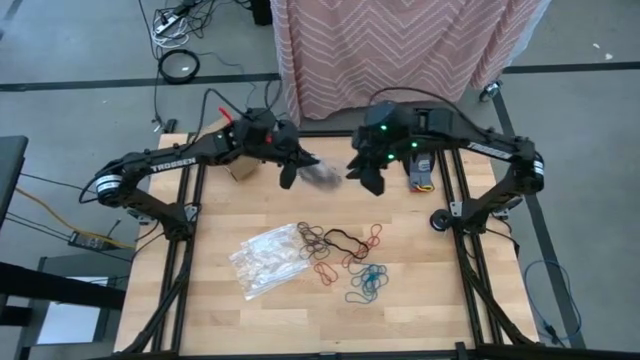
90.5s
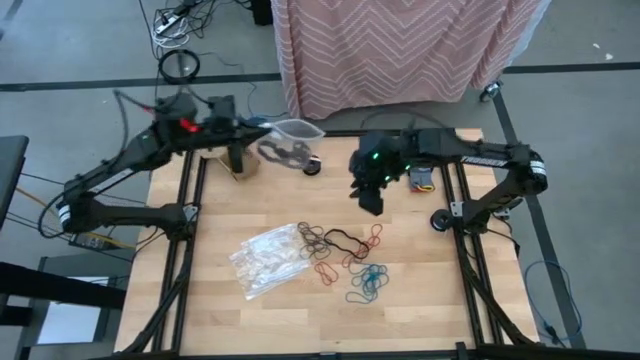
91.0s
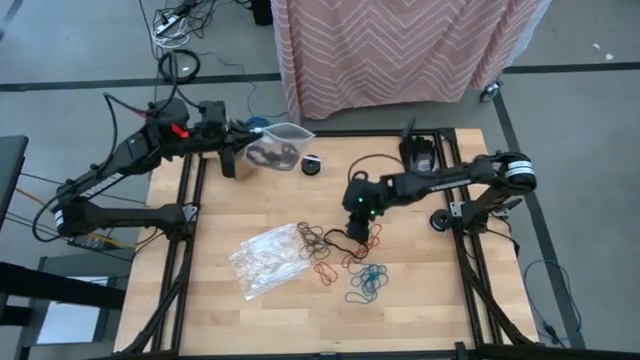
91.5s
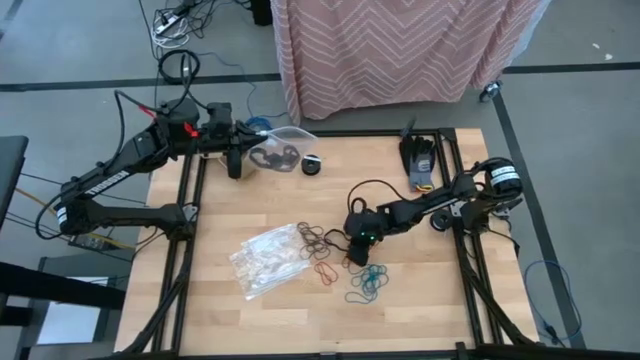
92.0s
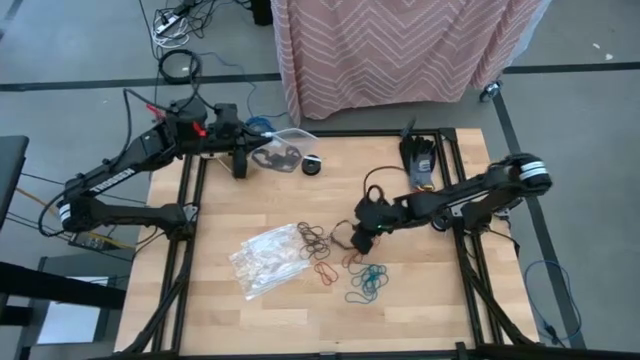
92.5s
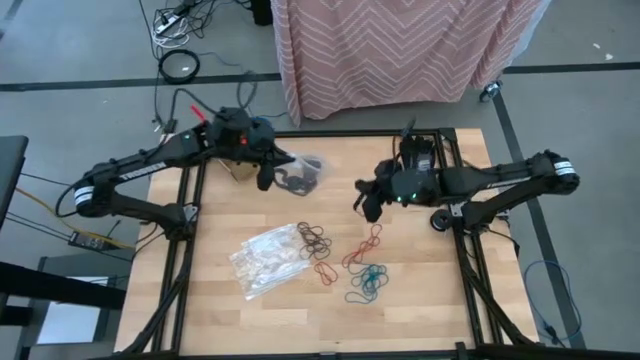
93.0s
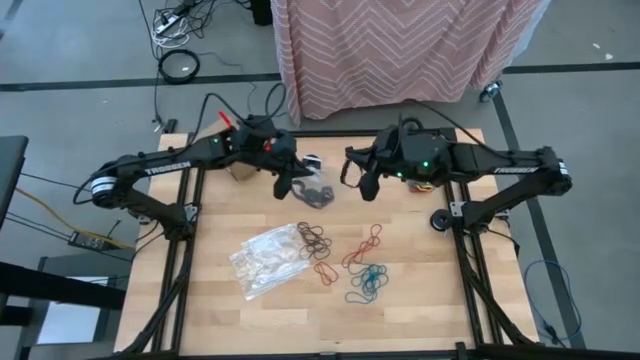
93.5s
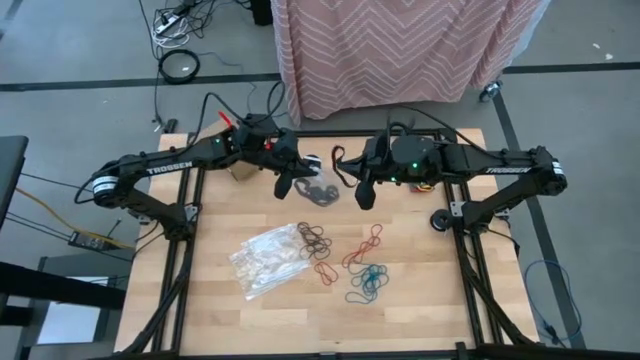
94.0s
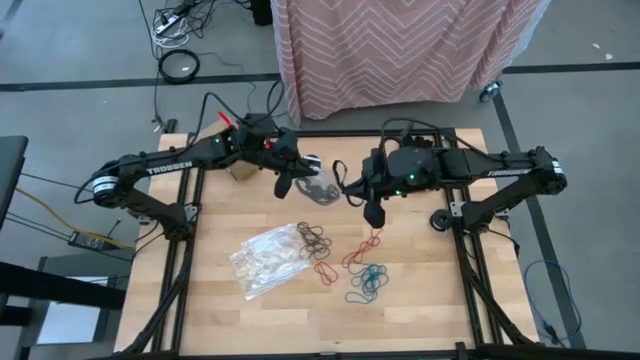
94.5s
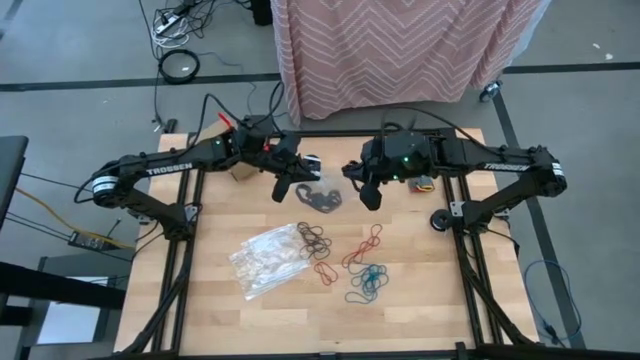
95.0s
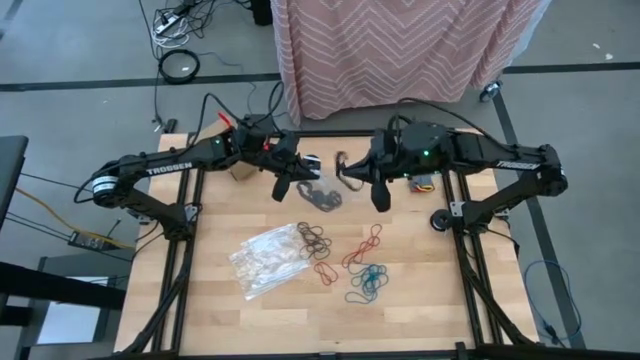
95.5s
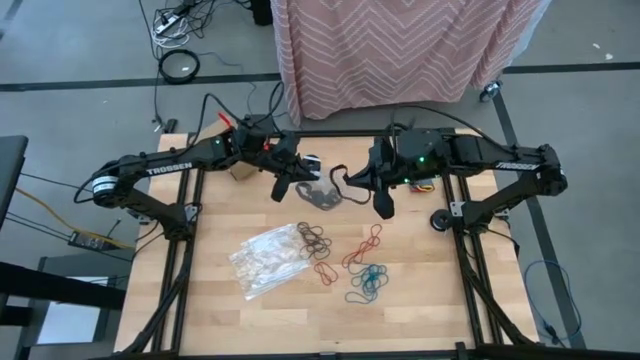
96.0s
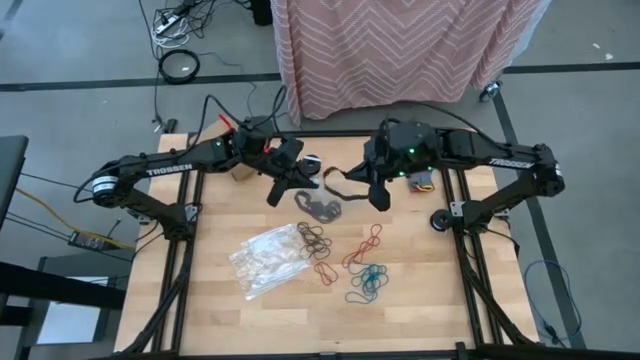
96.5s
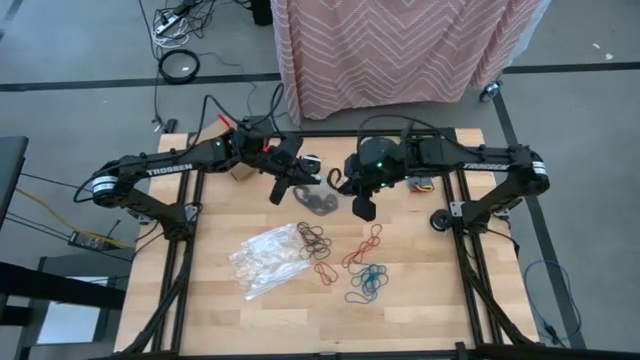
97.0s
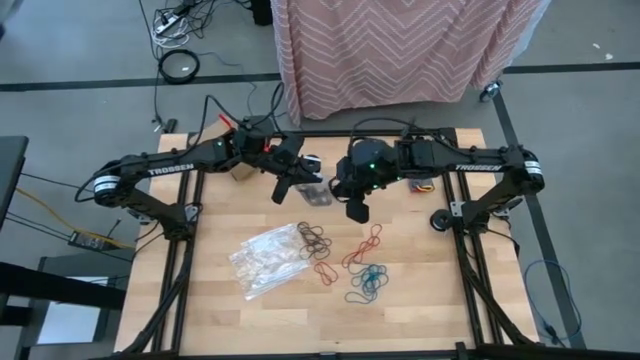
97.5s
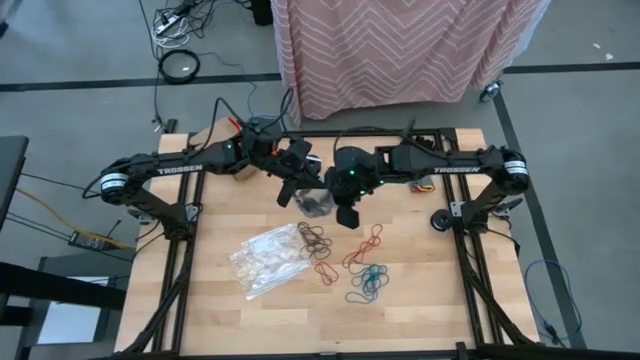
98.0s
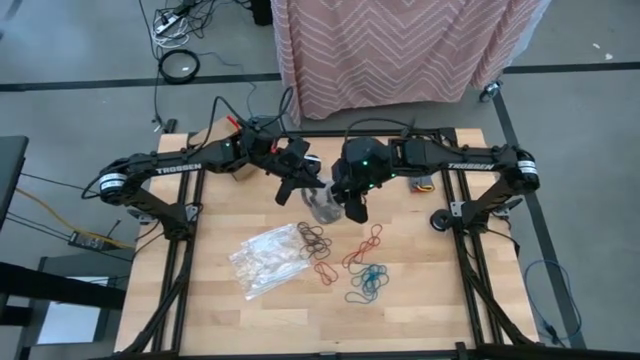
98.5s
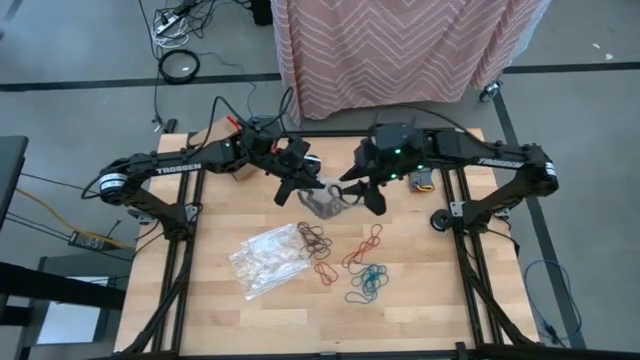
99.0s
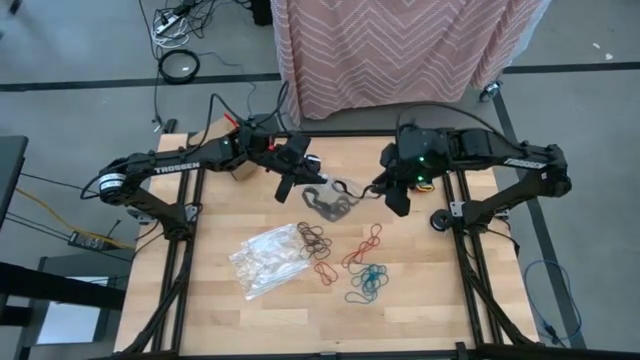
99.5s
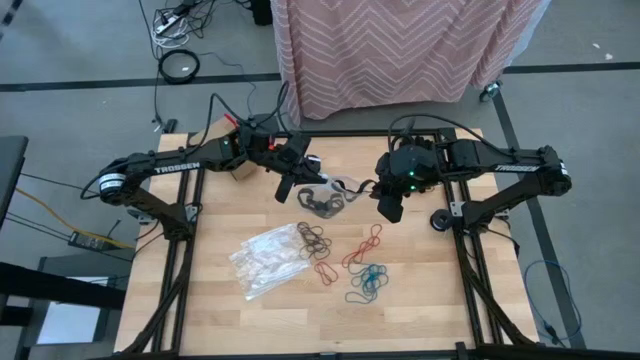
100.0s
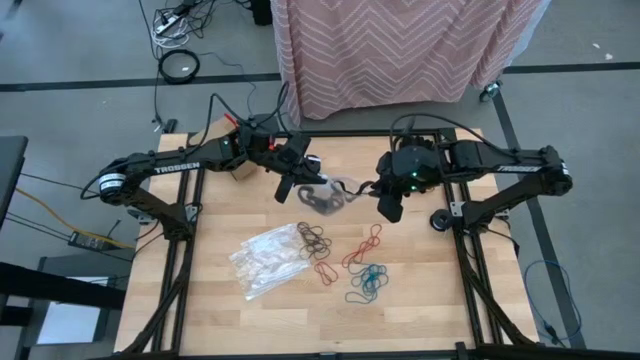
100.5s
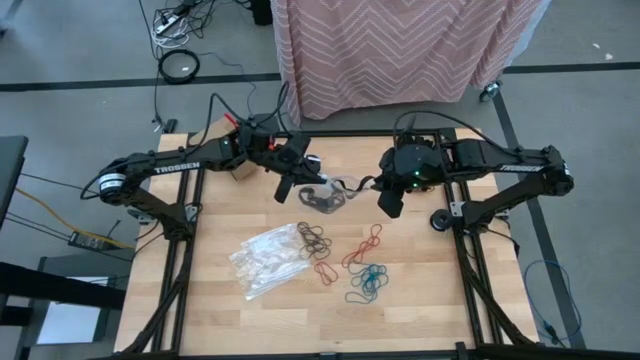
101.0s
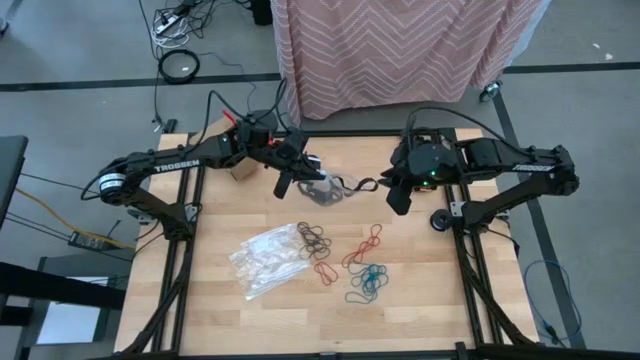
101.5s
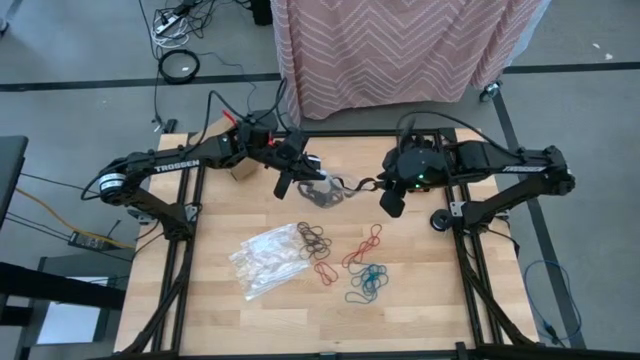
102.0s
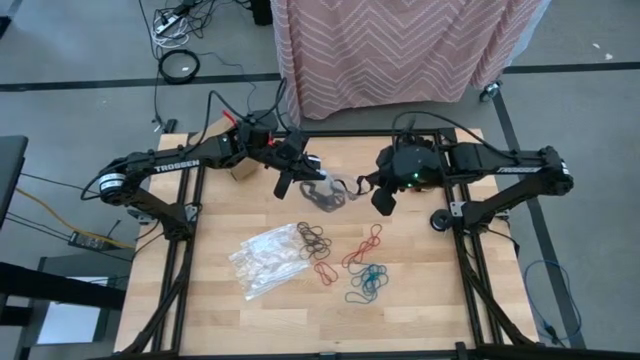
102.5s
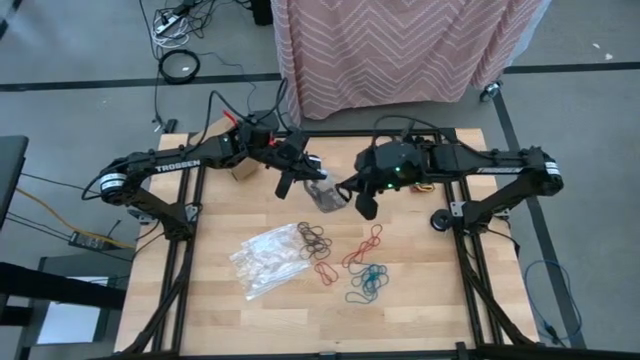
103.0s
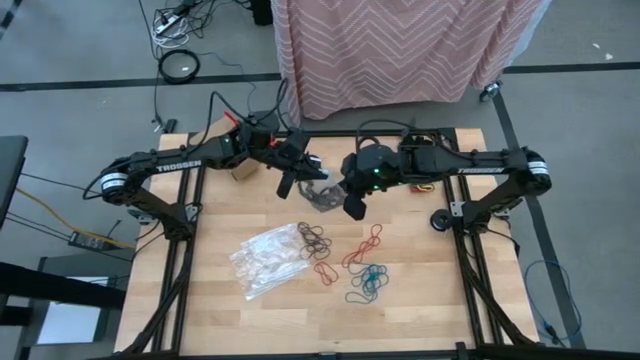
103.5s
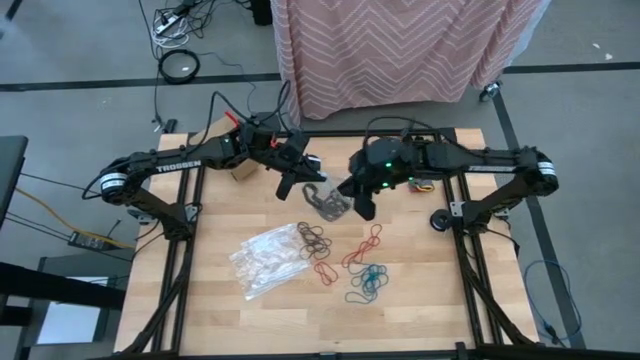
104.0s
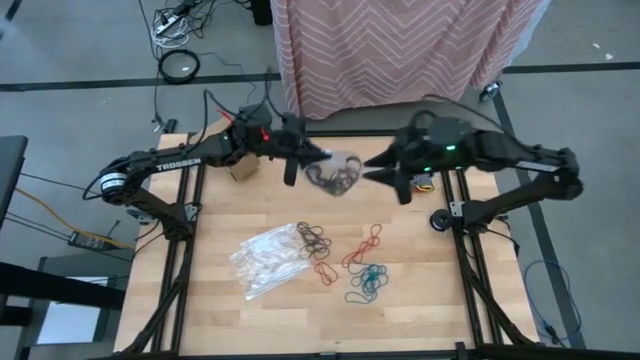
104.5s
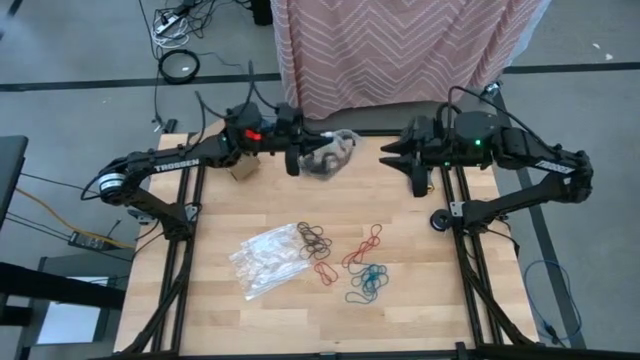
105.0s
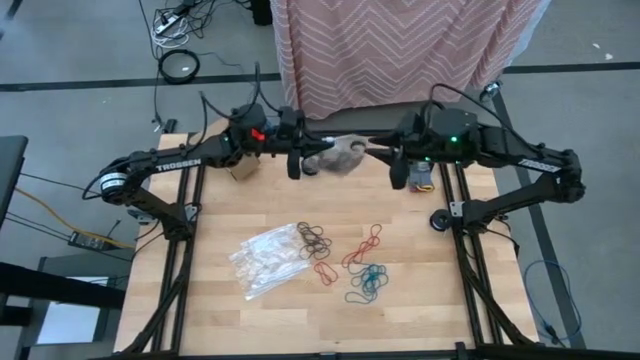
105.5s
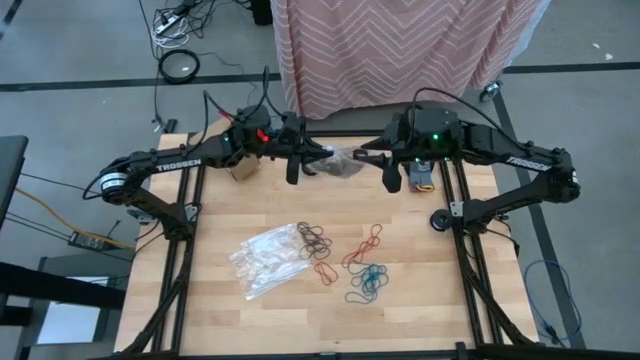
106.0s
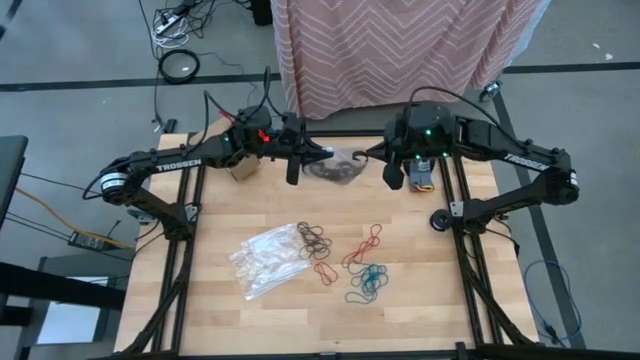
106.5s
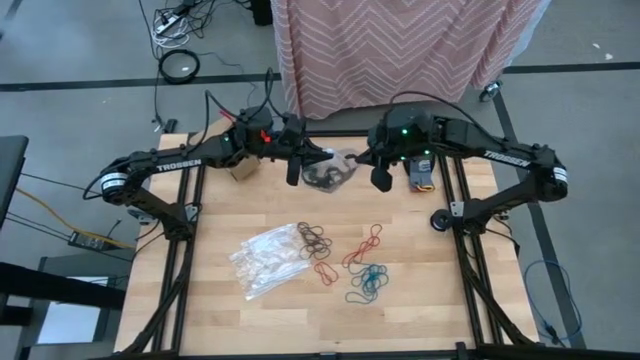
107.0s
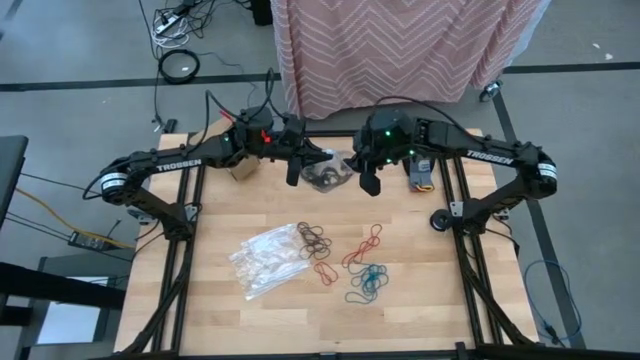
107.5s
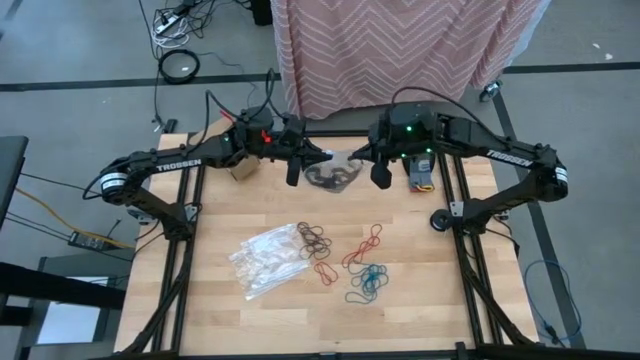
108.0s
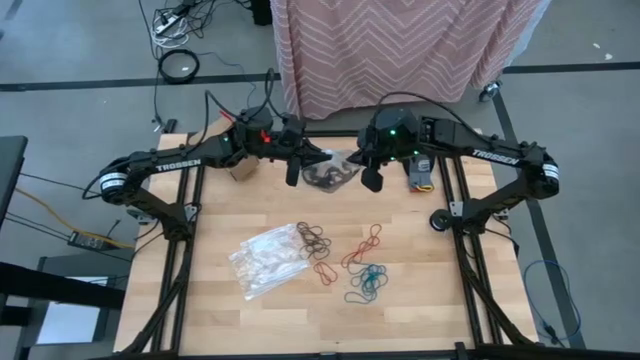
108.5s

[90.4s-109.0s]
Task: Sort rubber bands
Put the black rubber band into the transparent zip bag

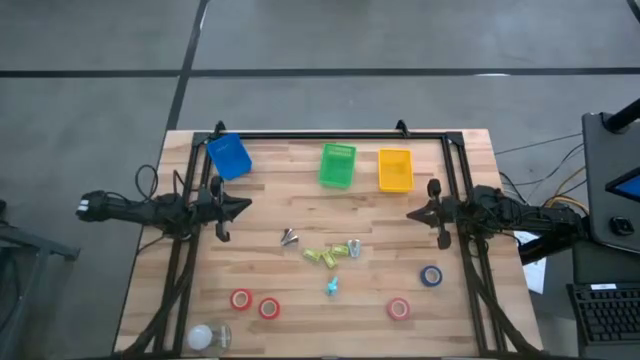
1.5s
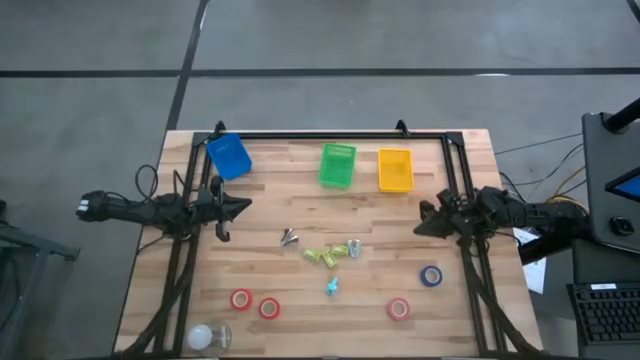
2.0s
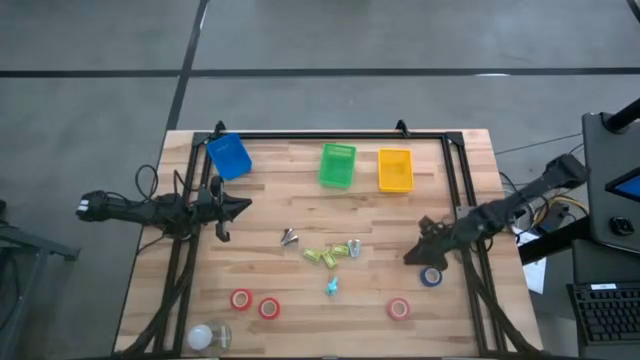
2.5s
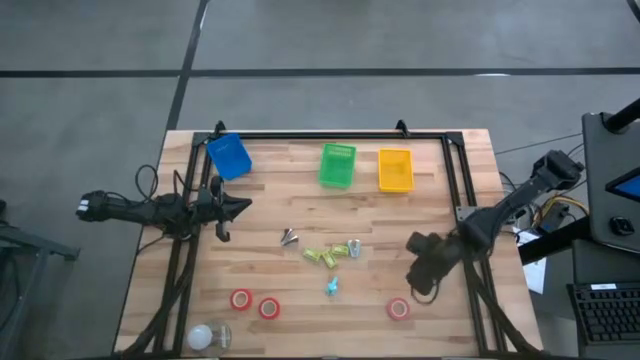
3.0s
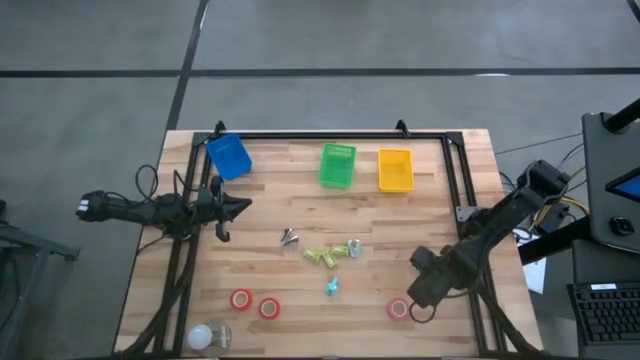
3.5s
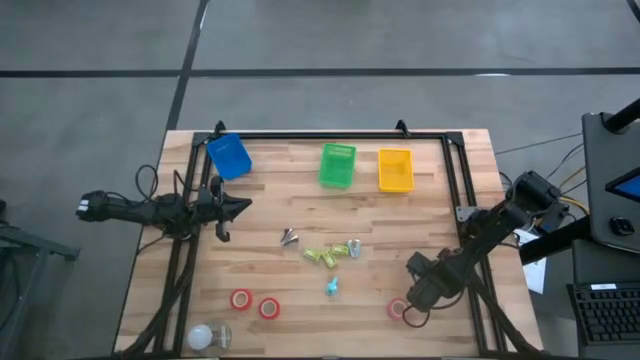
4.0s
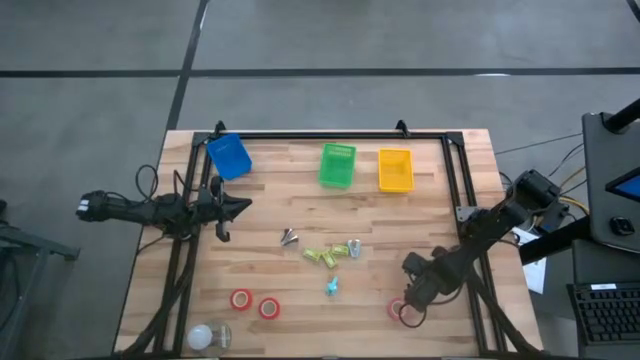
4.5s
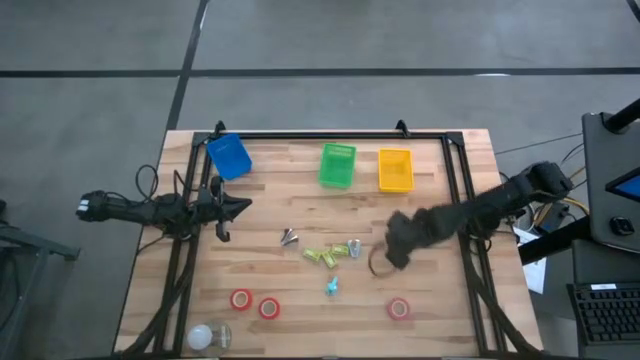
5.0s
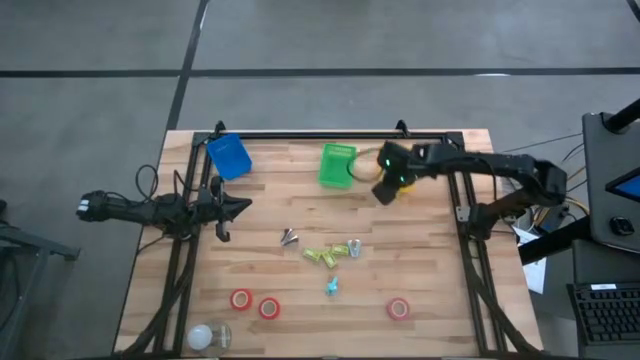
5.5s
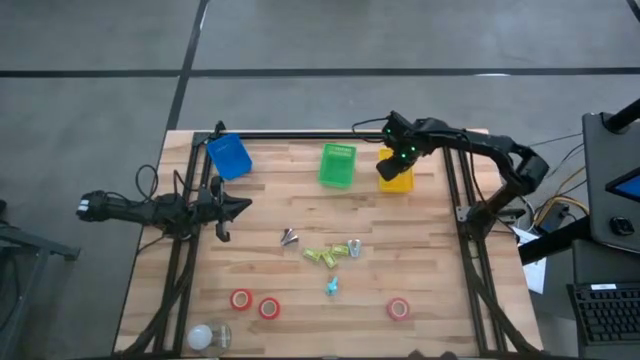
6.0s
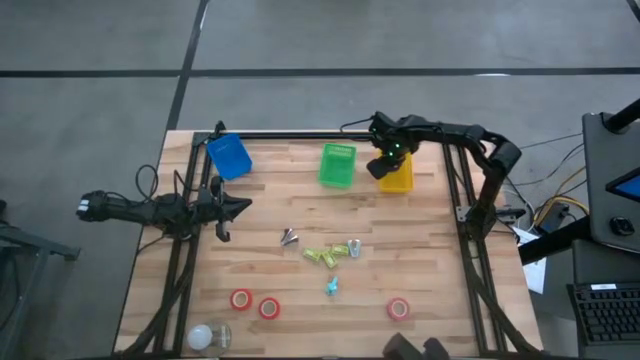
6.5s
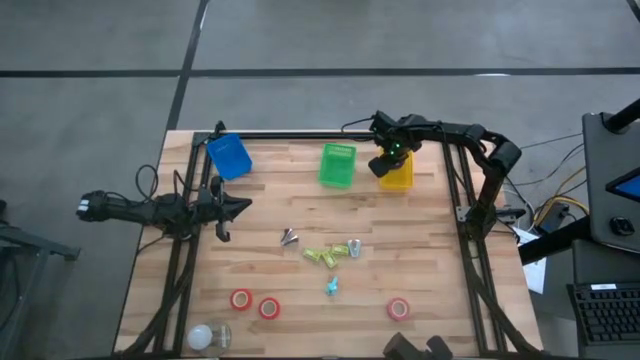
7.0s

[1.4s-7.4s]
Task: Pick and place Stapler, Stapler remover, tape
Put the blue tape into the yellow basket
